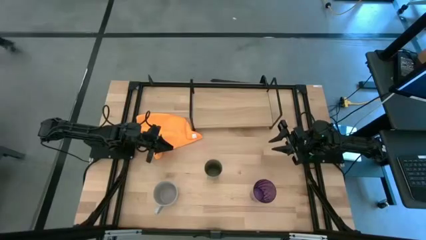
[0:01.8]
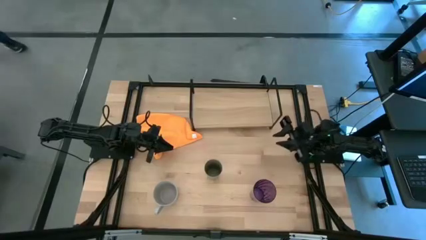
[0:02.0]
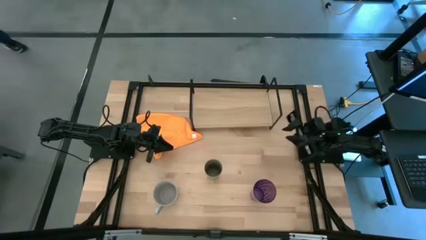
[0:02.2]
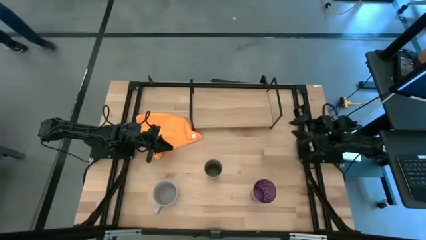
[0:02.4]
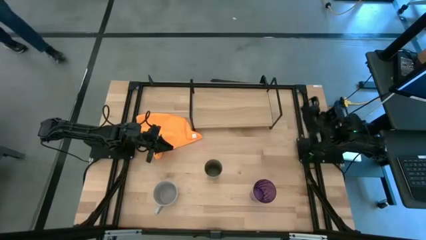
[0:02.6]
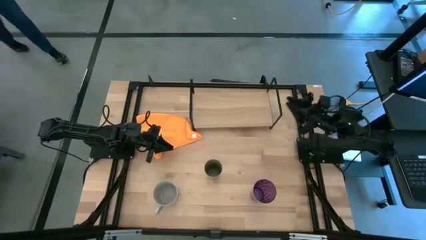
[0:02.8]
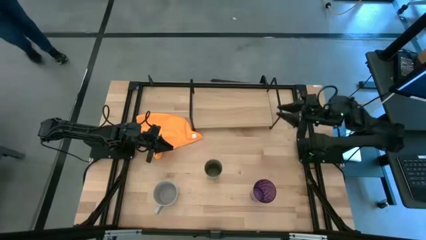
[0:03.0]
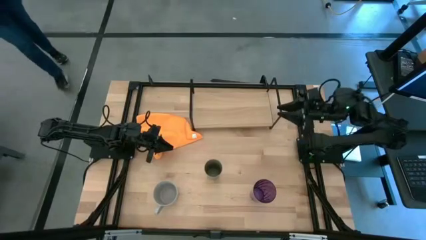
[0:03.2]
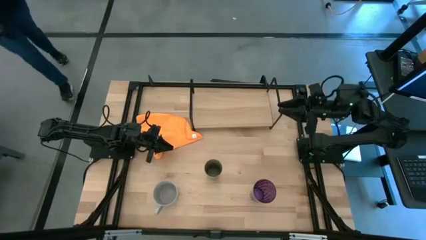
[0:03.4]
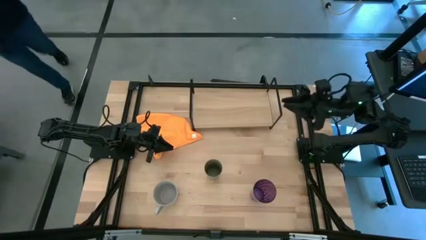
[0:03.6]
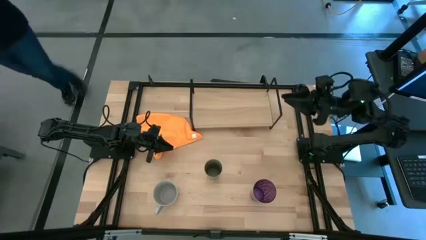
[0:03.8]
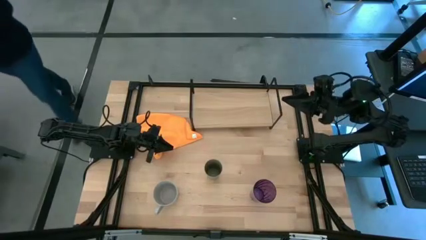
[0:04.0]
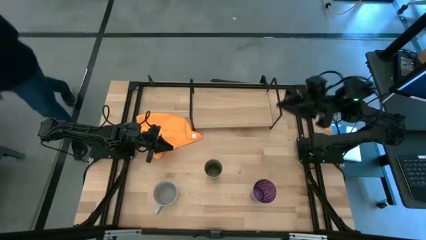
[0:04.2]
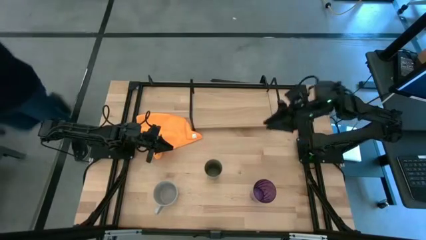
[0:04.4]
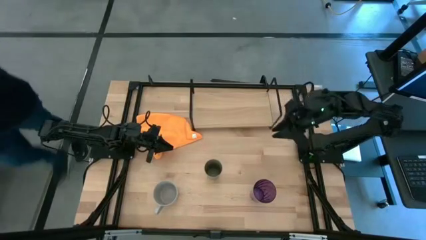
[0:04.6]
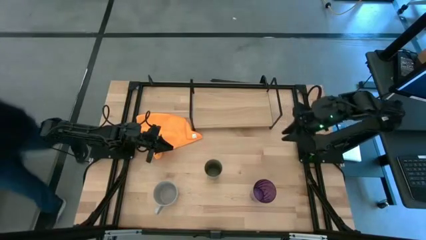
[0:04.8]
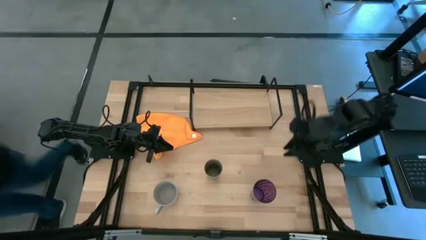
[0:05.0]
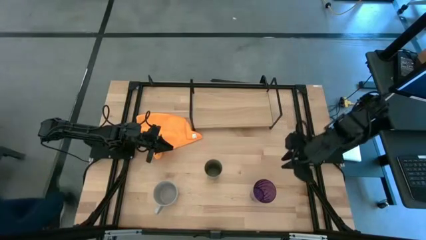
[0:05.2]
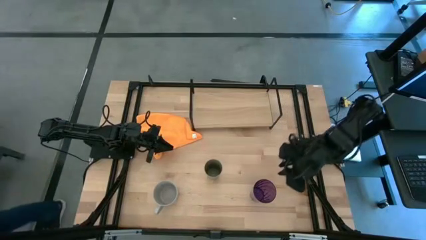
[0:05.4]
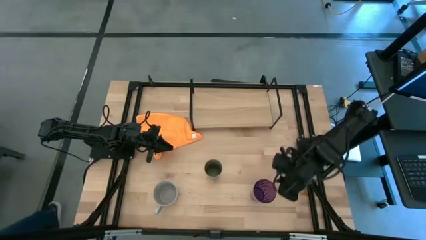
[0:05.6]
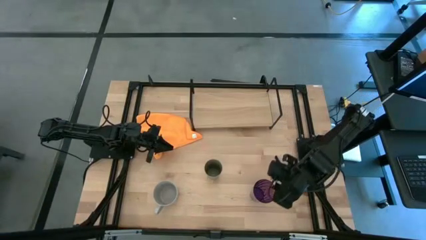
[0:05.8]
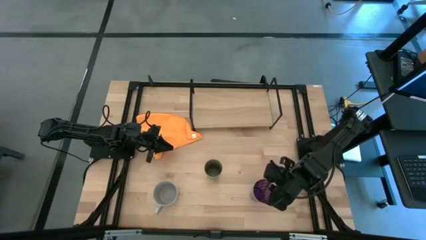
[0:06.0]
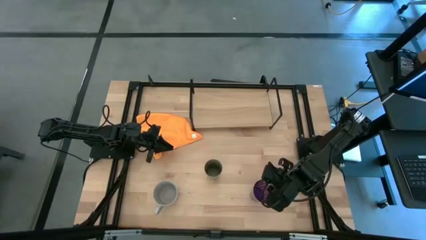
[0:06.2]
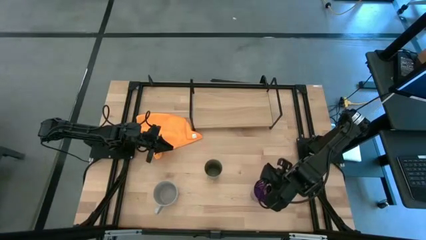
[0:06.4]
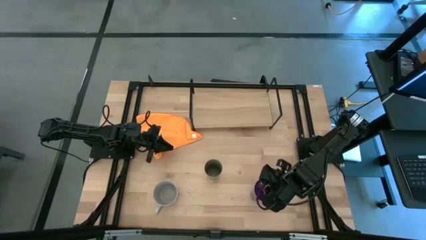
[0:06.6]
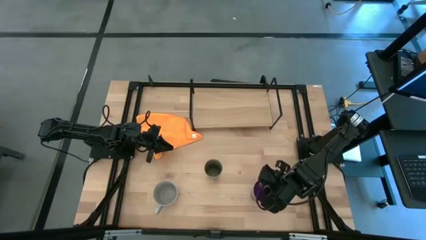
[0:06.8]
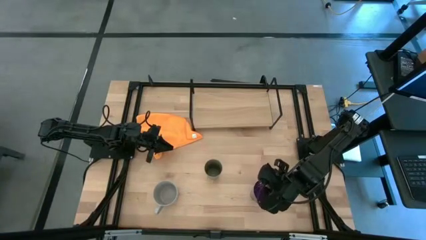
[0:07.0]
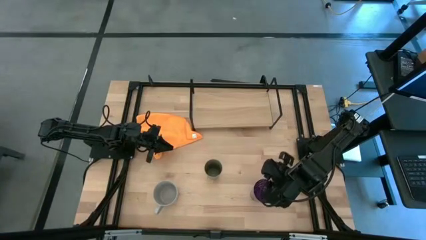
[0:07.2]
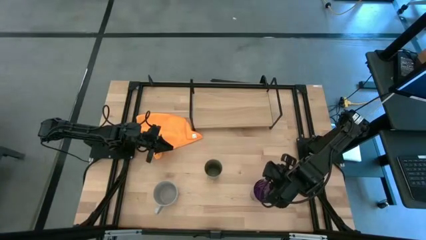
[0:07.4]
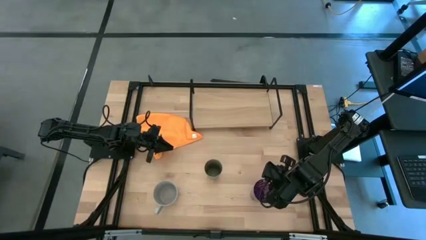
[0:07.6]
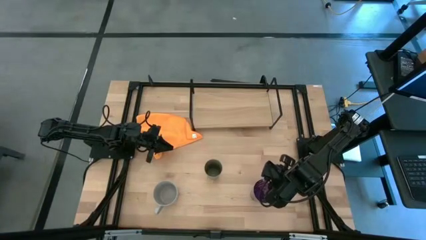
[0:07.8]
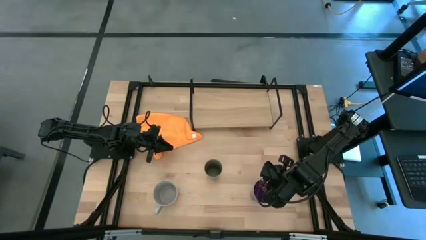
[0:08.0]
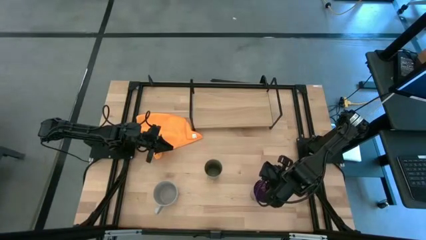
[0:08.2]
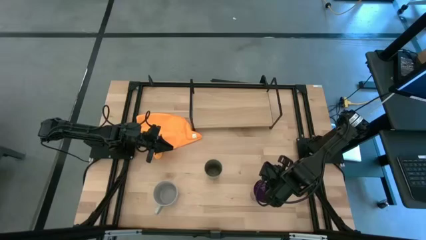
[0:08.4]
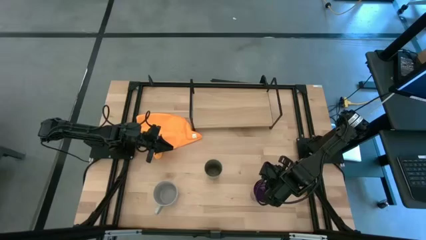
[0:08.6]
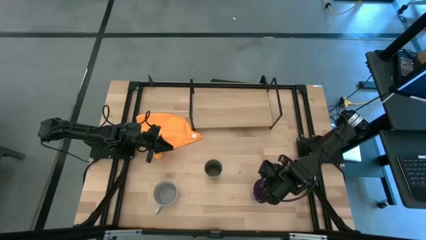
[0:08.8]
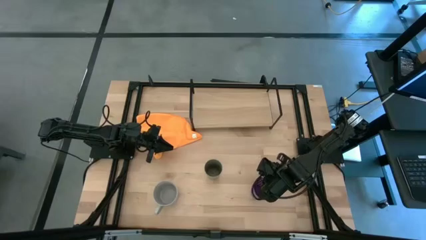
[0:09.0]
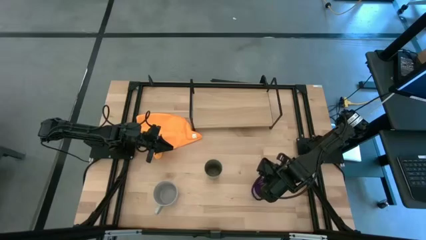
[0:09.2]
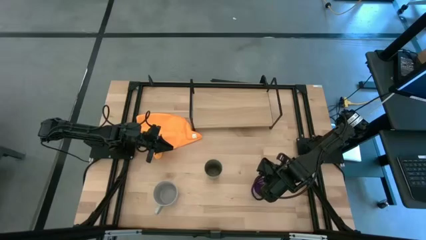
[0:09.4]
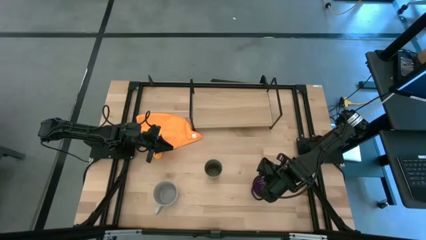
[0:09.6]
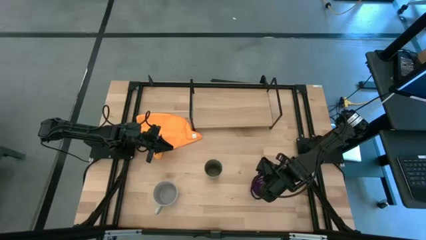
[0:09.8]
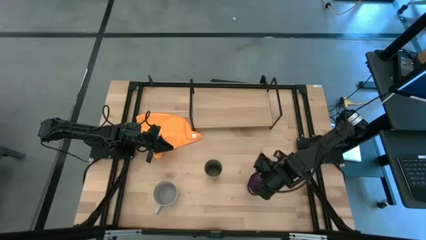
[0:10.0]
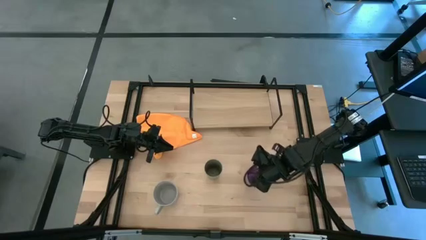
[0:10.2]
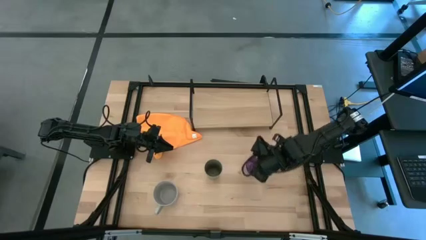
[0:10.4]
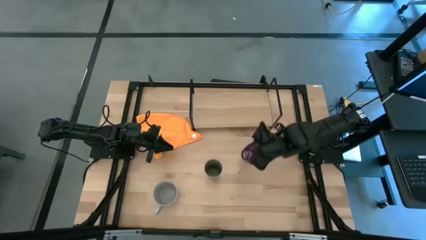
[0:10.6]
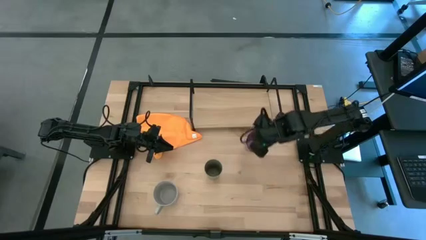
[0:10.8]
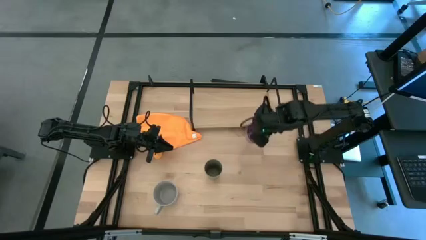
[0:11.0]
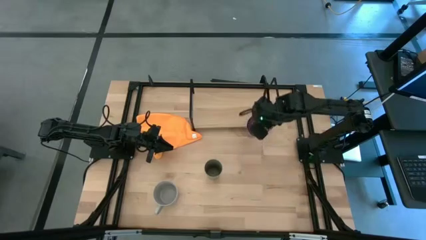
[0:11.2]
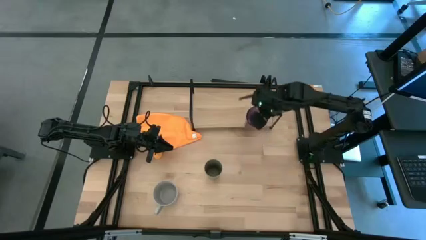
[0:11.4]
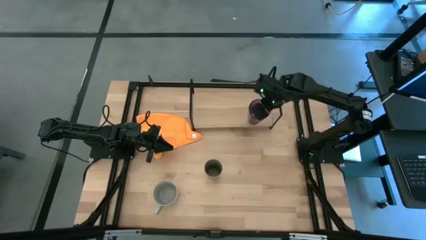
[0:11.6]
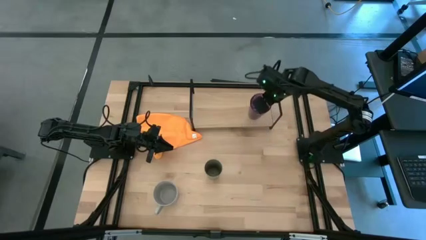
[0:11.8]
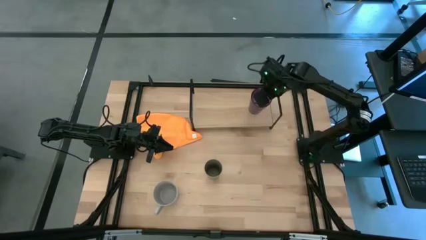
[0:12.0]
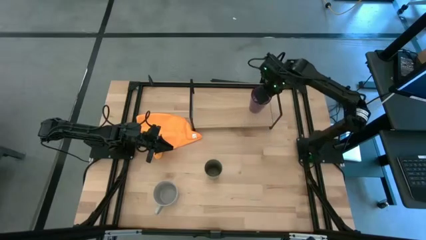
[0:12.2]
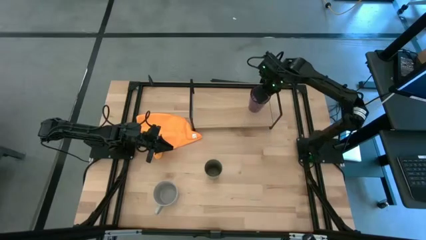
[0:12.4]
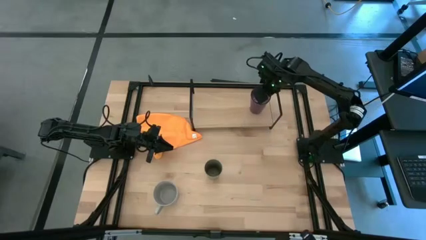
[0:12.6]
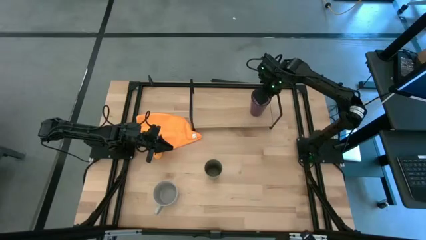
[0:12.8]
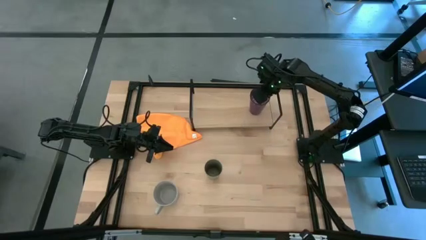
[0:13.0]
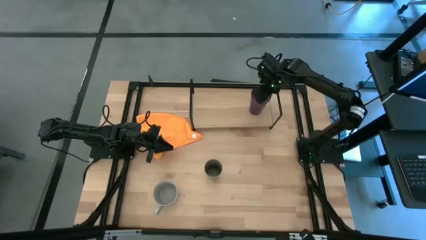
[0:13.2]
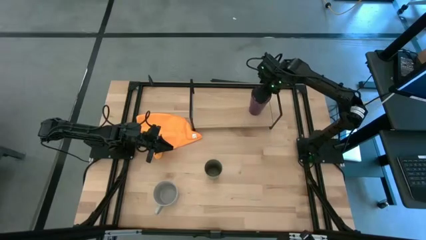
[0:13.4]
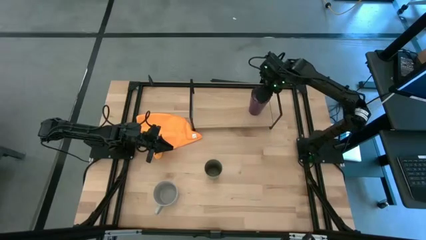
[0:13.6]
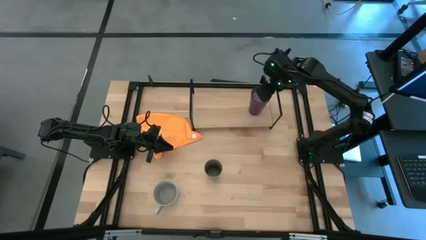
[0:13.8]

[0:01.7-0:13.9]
Task: Stack small to large cups/mugs on shelf
Put the violet cup on the shelf

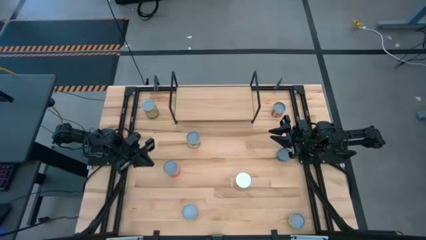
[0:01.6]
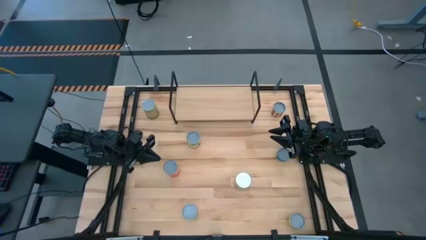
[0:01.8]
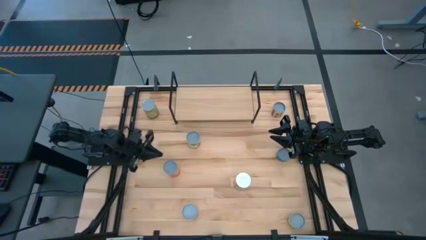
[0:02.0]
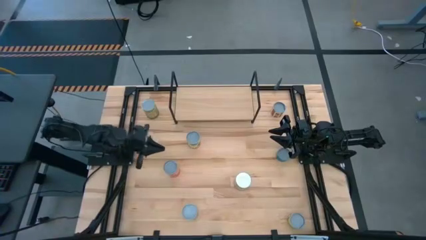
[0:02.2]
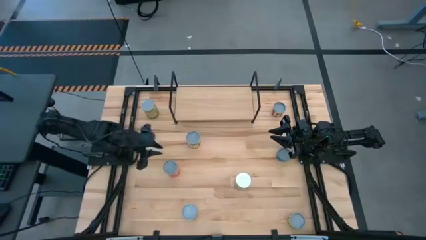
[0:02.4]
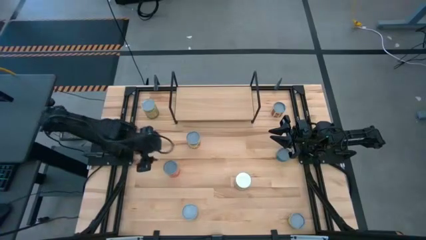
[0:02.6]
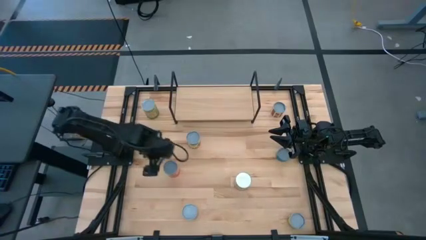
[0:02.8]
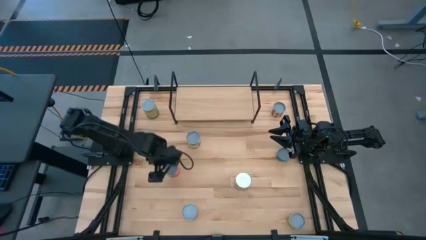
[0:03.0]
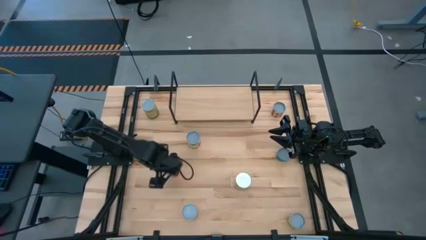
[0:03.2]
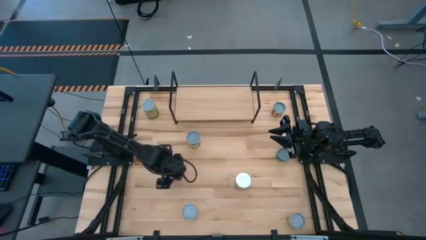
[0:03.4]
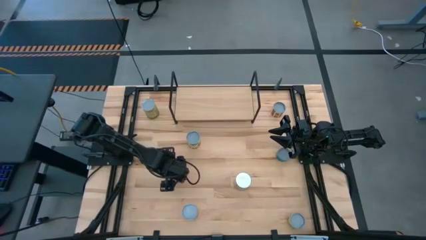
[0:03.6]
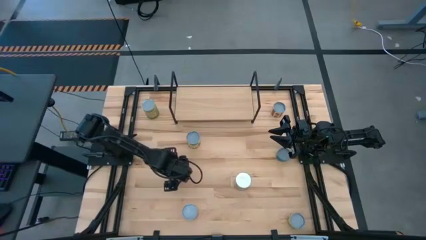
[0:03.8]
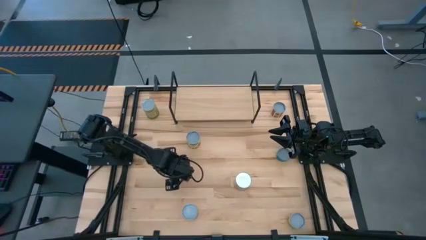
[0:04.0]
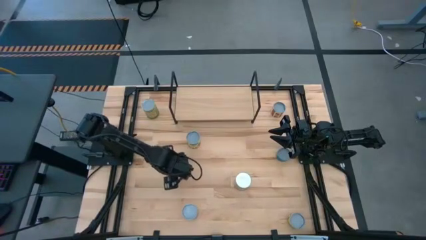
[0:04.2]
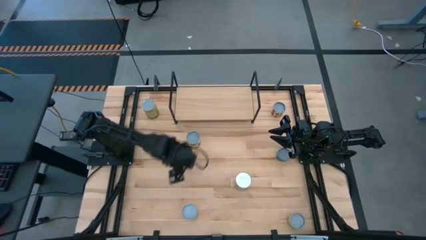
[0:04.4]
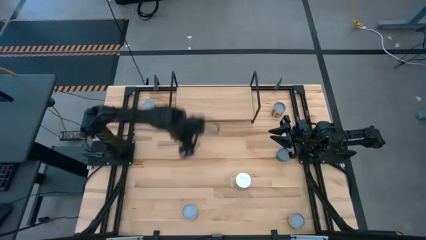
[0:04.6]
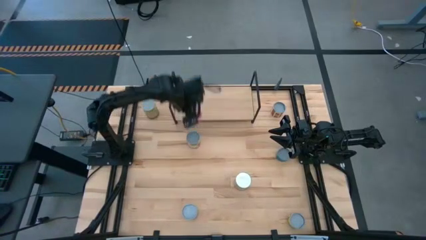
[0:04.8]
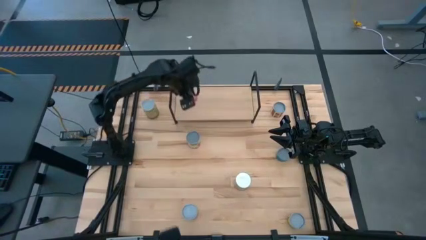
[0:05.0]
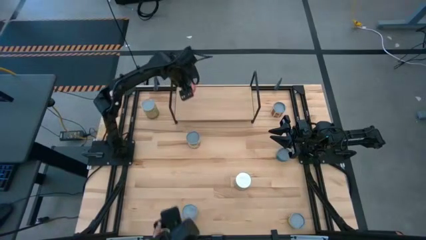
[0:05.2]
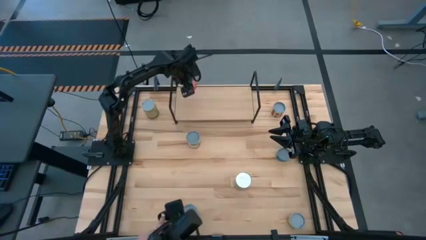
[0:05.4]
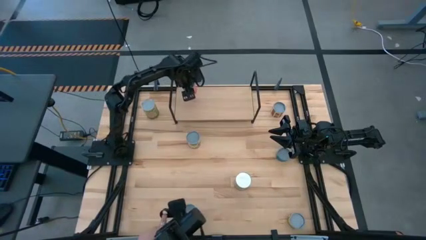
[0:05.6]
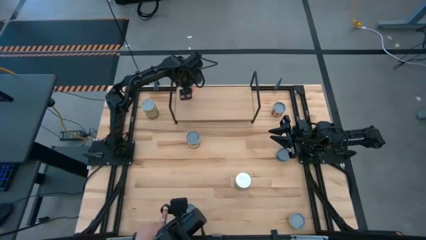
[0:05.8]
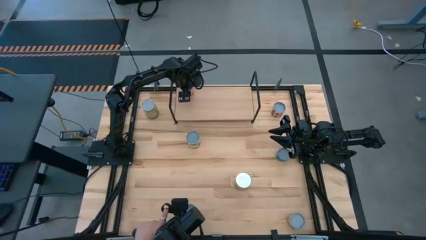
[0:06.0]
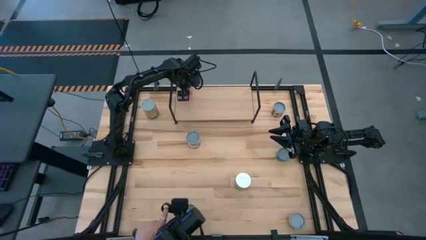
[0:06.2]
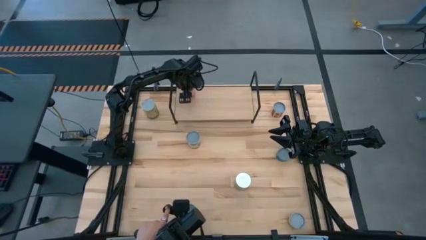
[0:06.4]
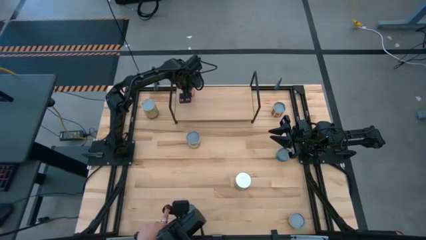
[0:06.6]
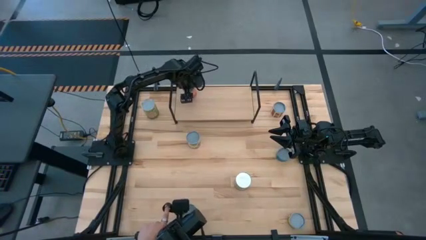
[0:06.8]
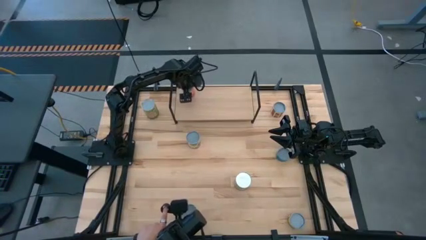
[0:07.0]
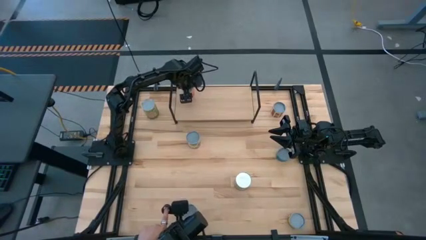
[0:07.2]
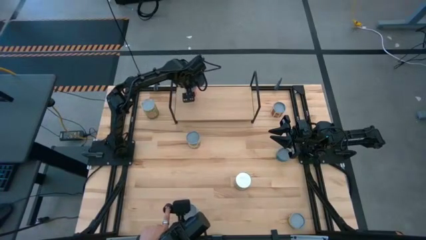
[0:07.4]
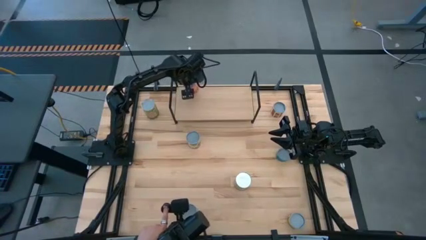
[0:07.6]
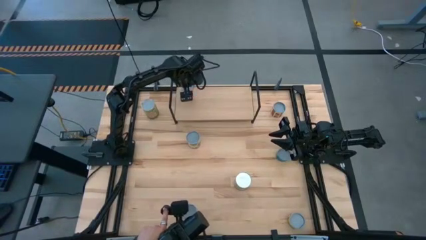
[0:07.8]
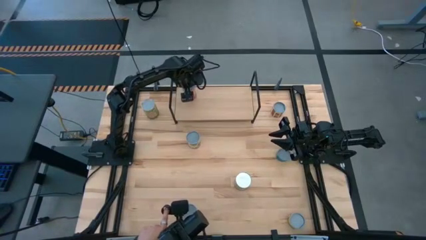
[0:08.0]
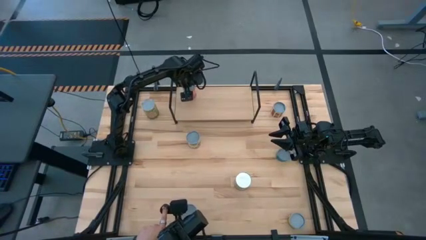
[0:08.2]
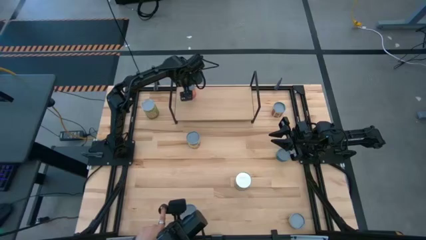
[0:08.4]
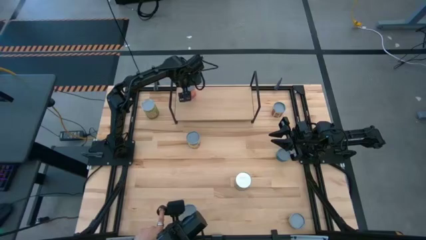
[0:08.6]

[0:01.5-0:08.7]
Task: Pick and place cans onto a shelf
Put the canned mixed fruit on the shelf
